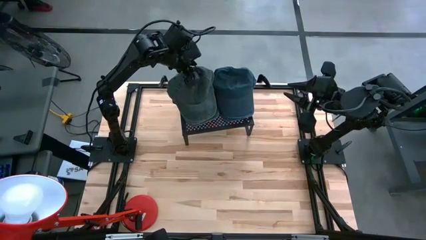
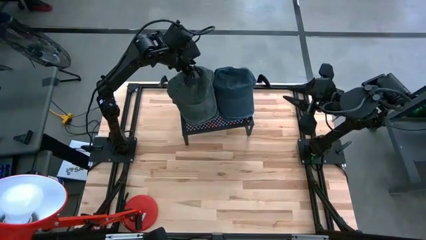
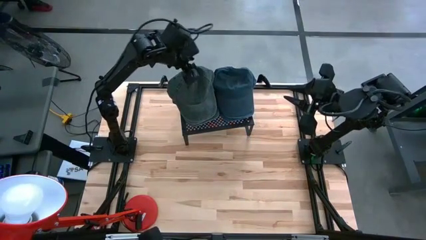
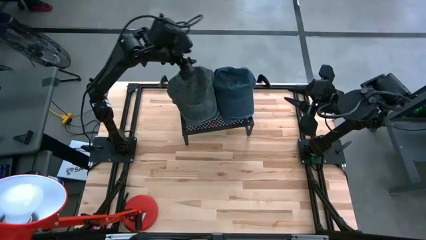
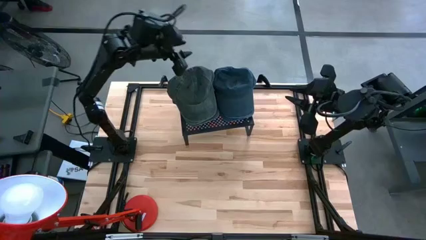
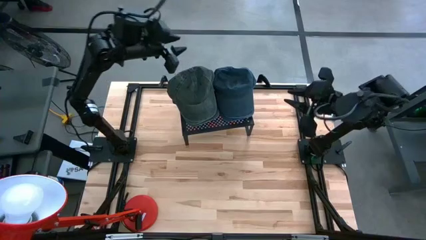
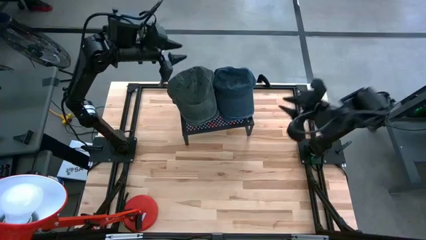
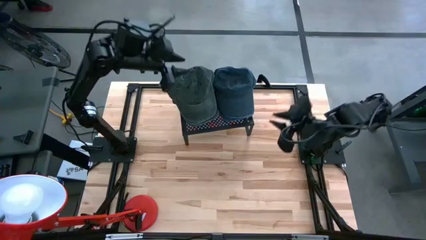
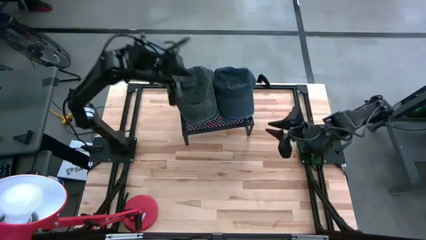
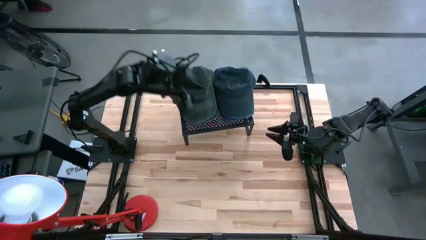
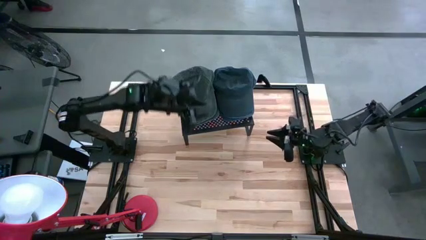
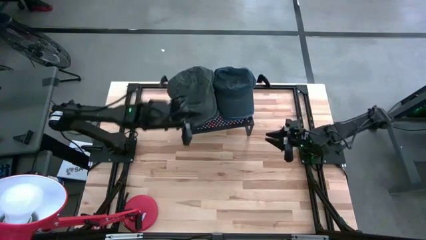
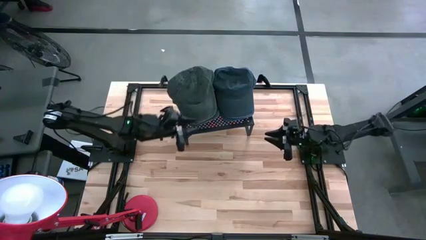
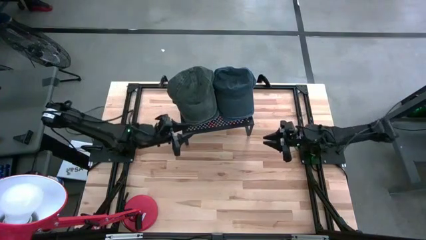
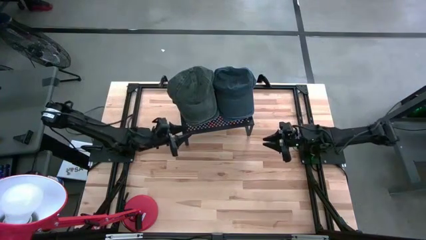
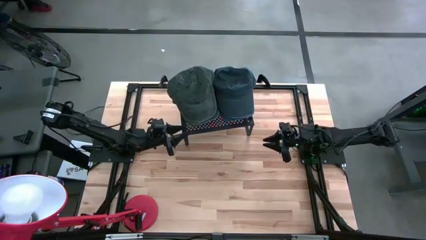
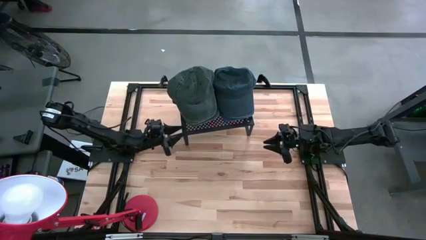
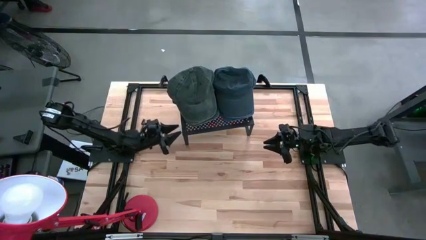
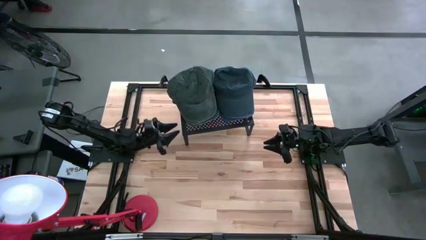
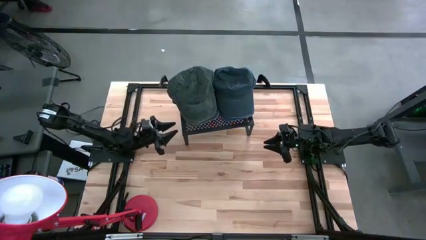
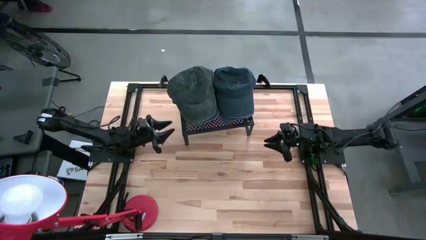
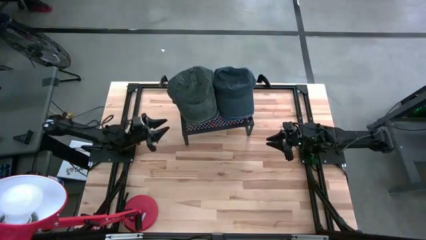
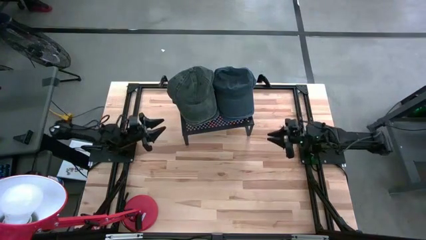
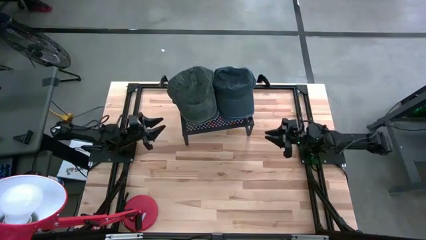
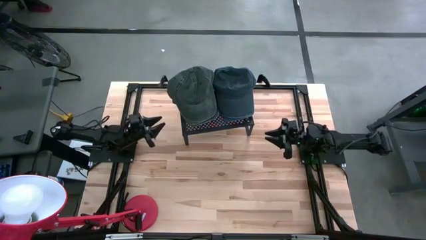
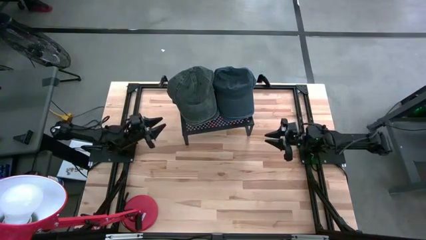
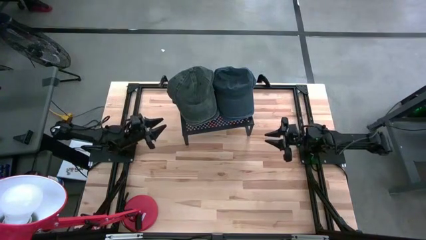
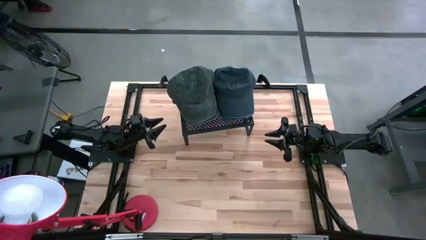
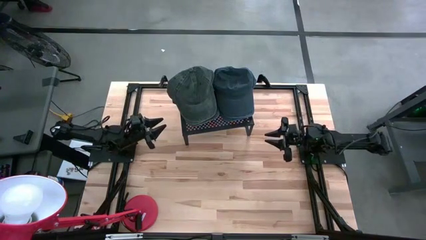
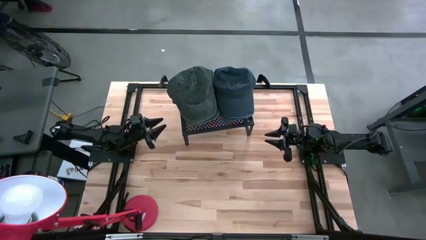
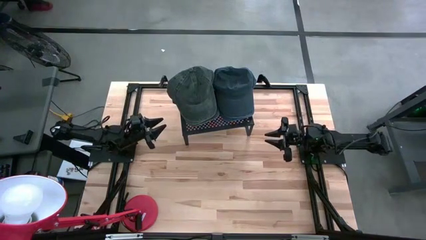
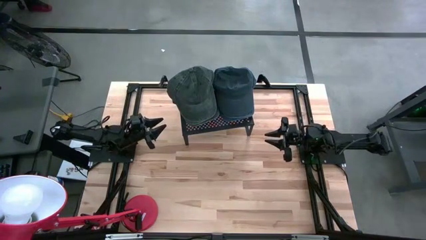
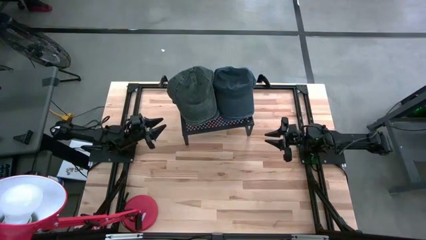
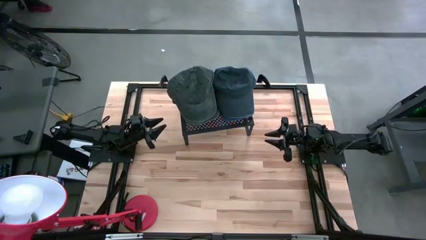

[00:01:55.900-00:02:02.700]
Task: Pick & Place hat
Return to Home Position

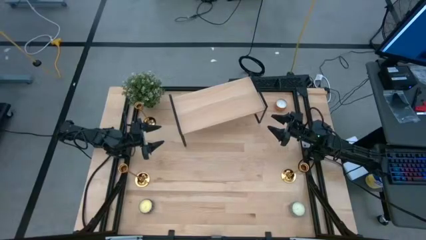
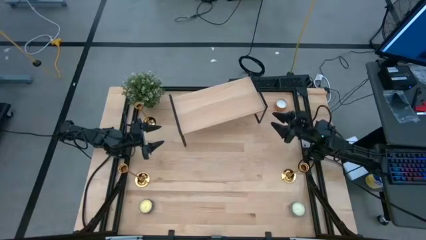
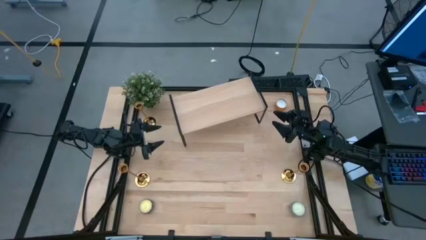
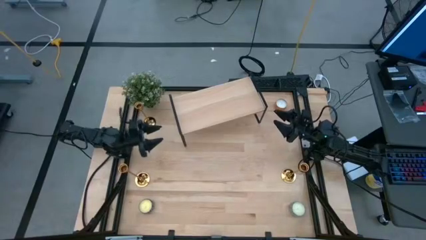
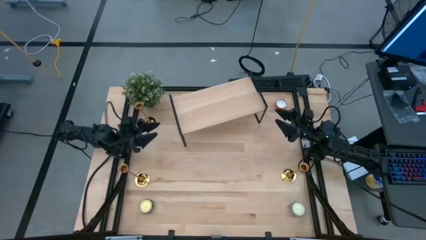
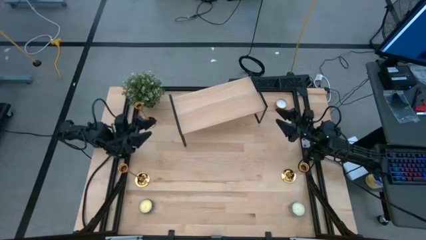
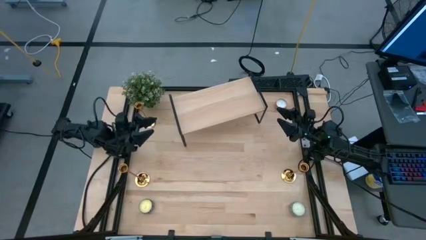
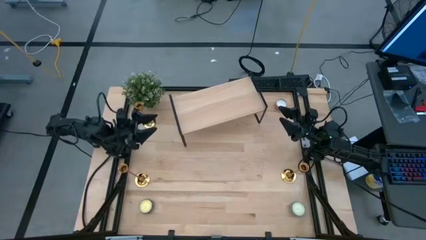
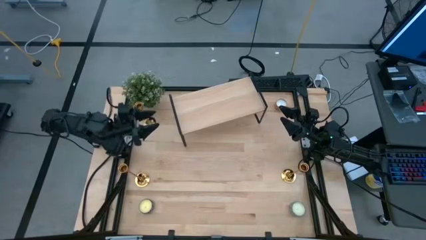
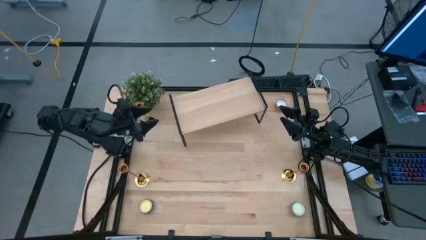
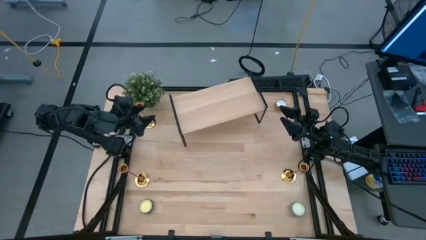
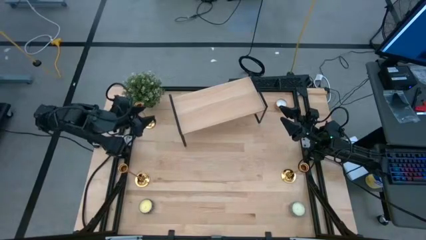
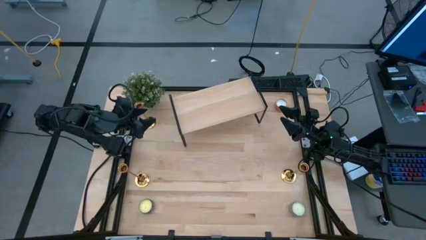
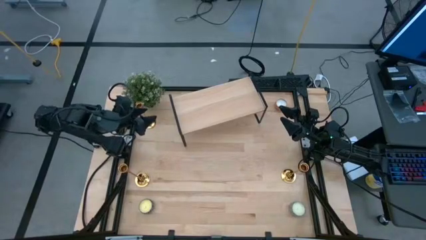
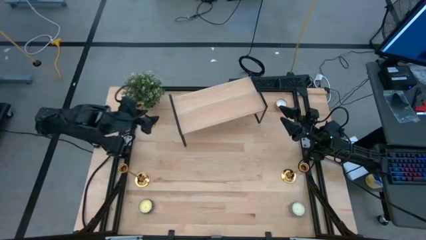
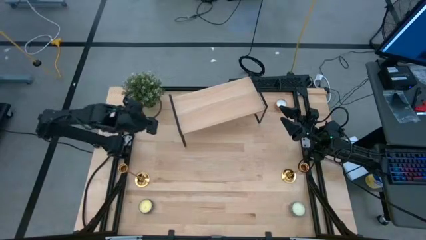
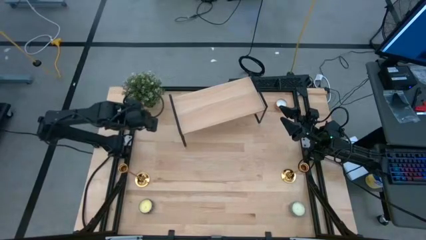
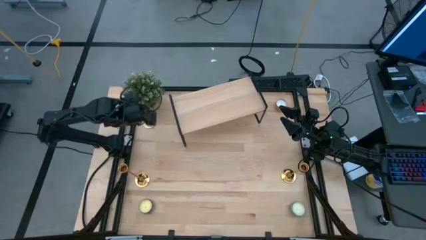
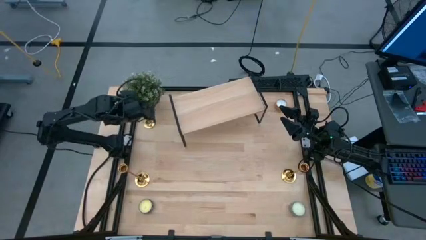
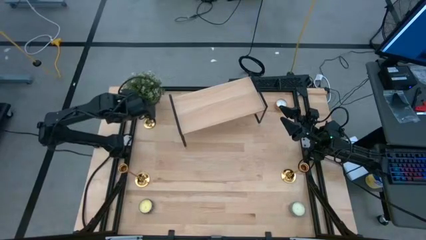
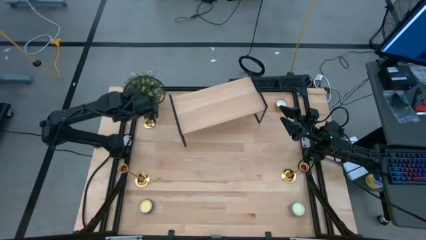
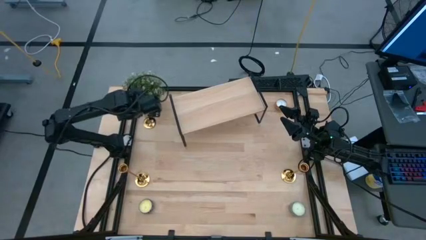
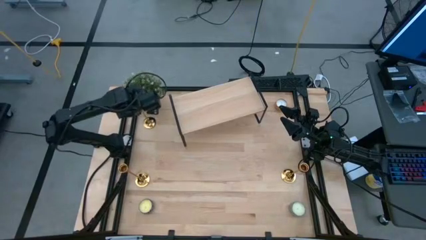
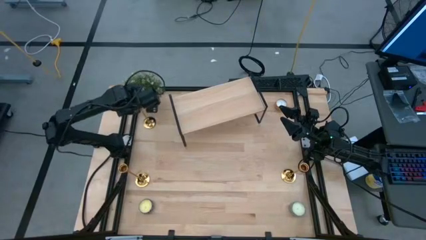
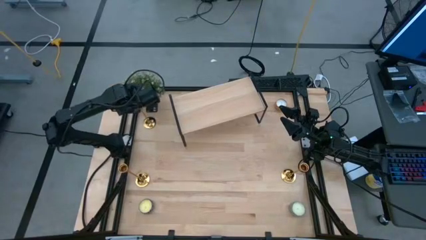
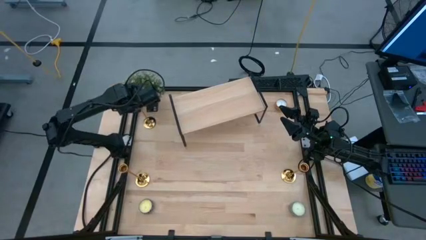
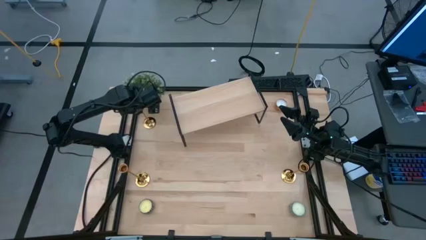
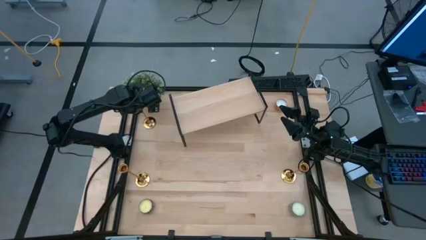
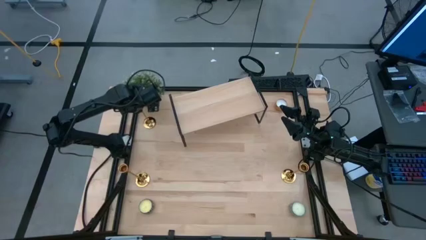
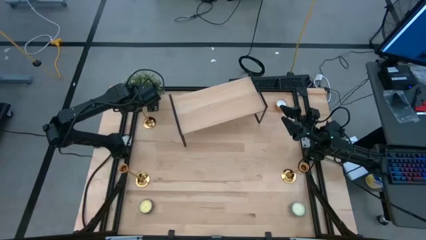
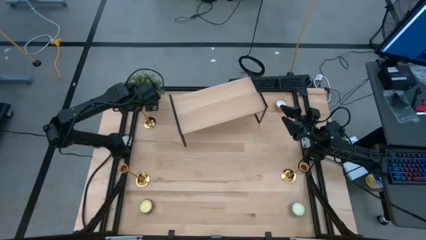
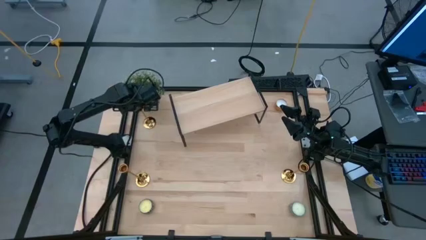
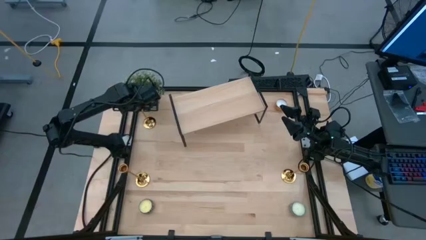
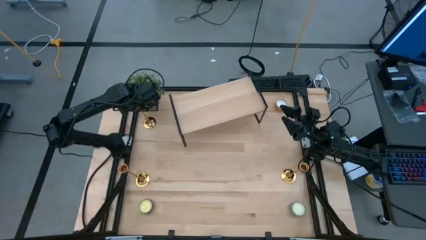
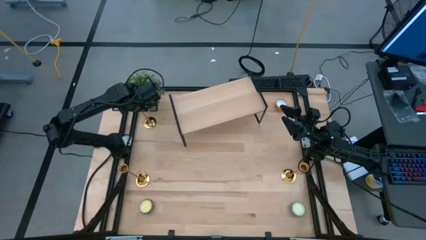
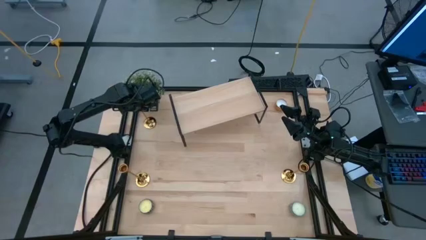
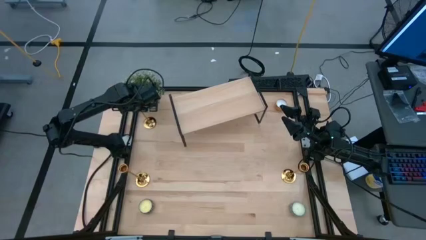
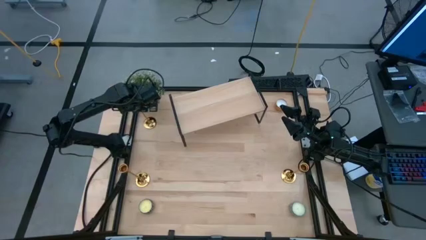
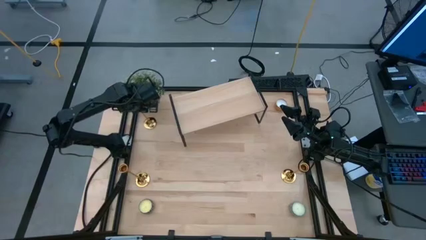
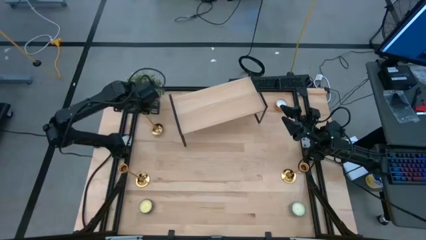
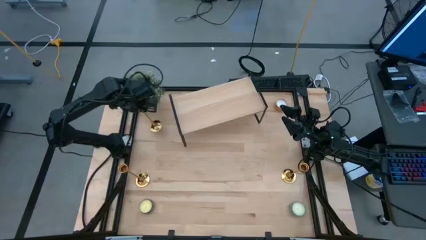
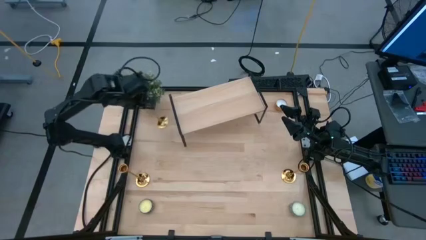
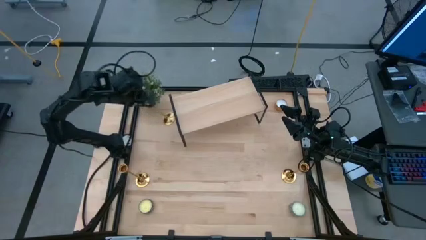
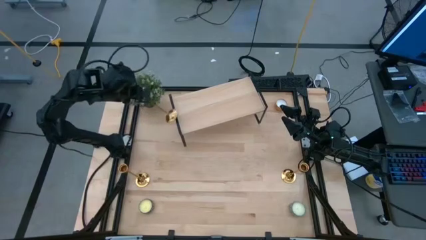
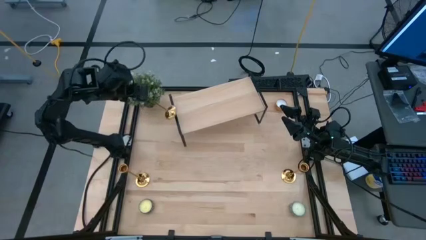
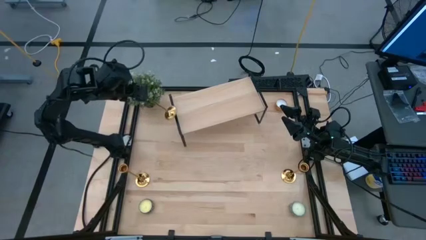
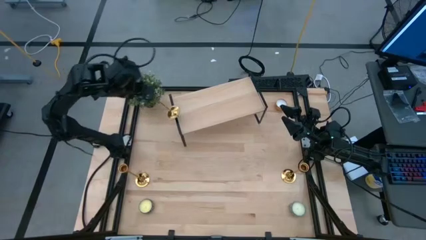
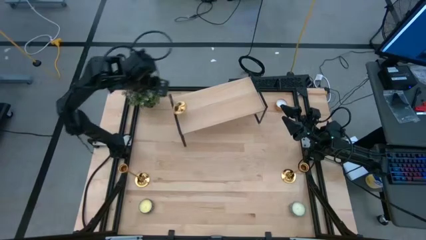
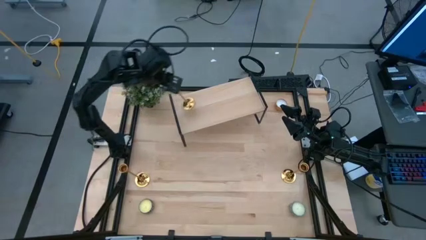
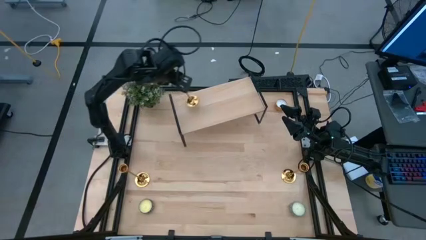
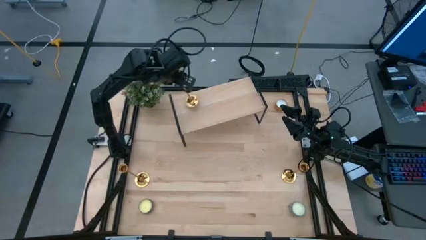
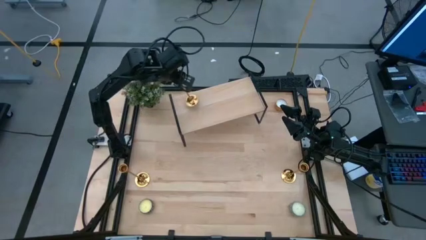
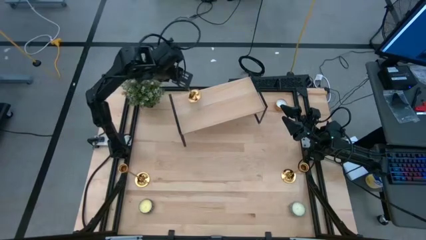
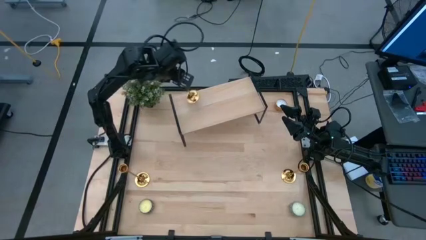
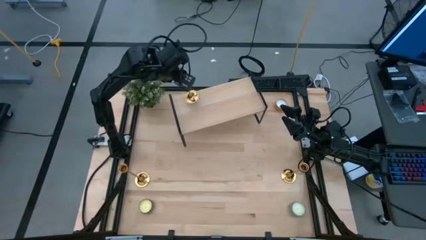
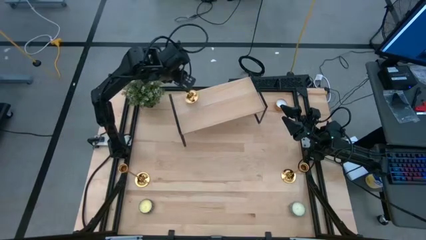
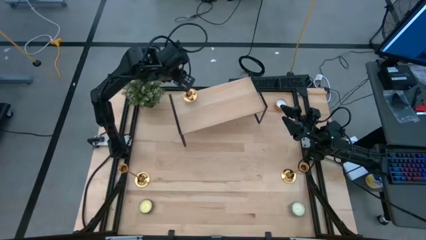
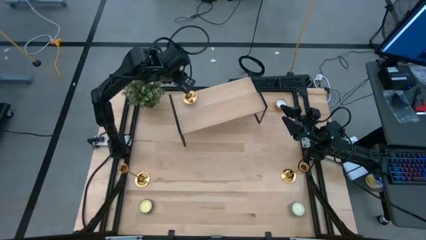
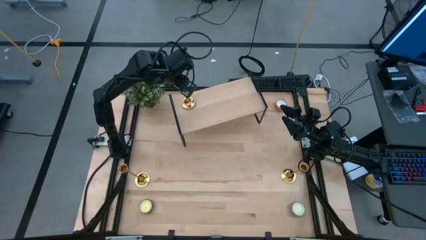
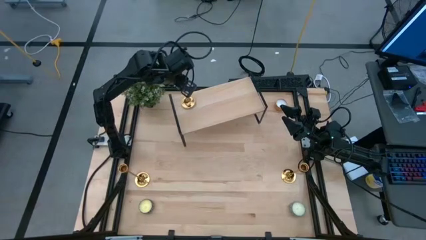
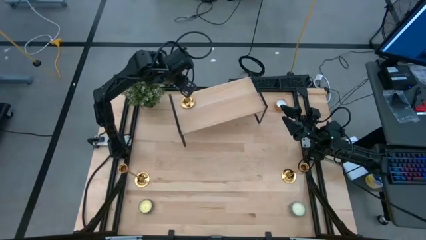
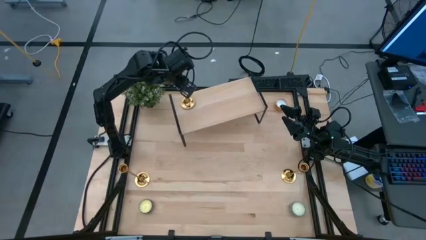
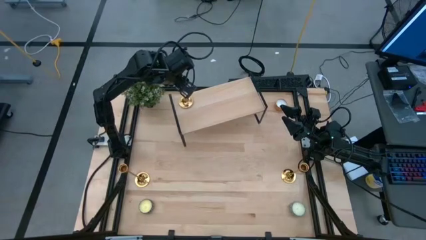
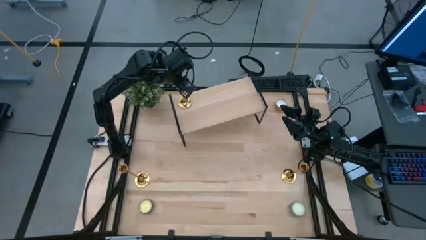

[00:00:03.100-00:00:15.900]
Task: Pick & Place candle stick holders
Put the top left gold candle holder on the shelf
